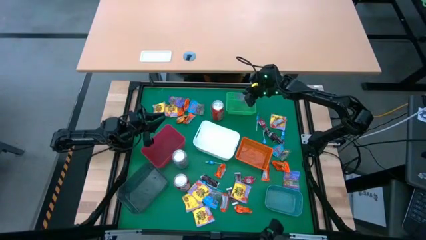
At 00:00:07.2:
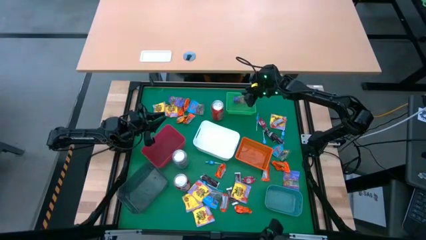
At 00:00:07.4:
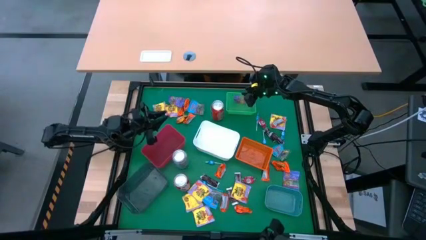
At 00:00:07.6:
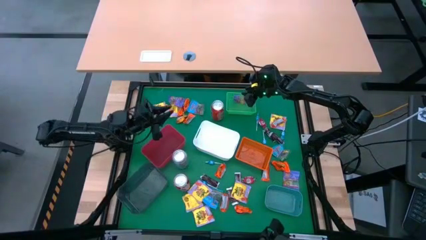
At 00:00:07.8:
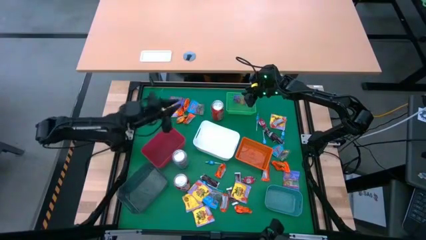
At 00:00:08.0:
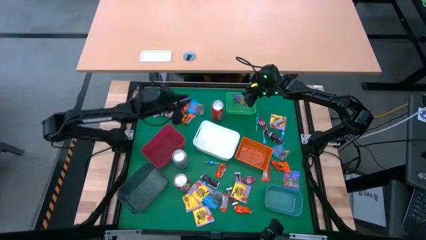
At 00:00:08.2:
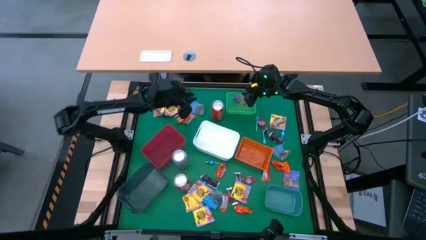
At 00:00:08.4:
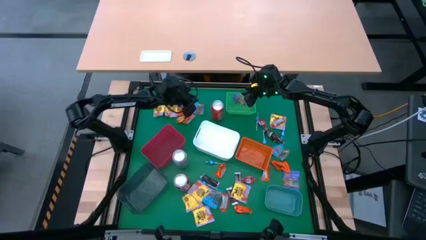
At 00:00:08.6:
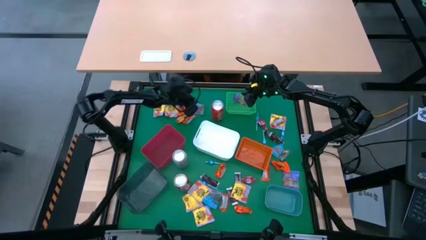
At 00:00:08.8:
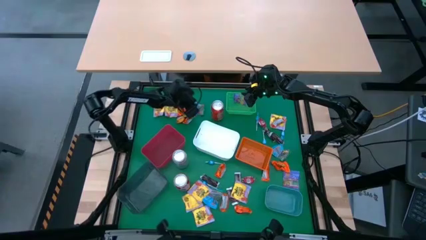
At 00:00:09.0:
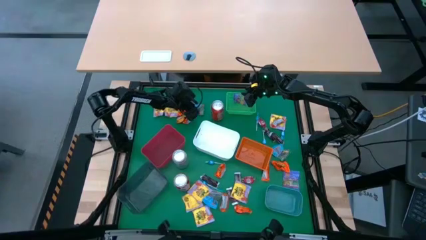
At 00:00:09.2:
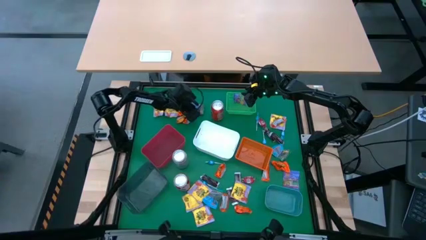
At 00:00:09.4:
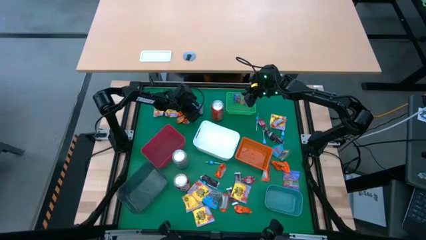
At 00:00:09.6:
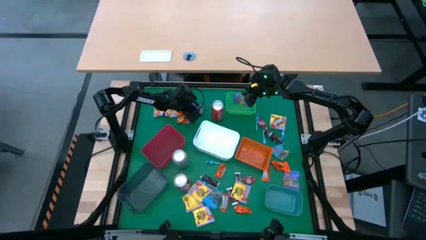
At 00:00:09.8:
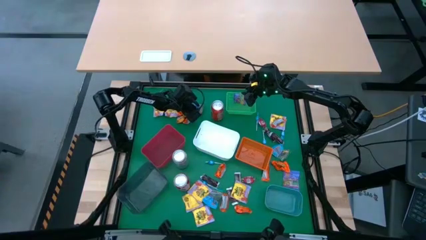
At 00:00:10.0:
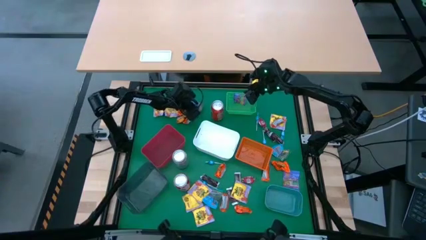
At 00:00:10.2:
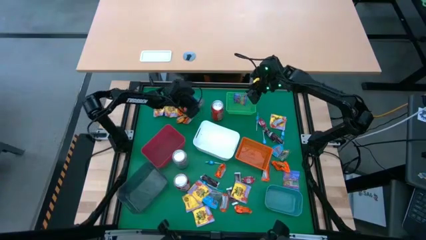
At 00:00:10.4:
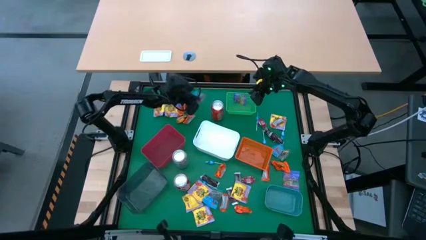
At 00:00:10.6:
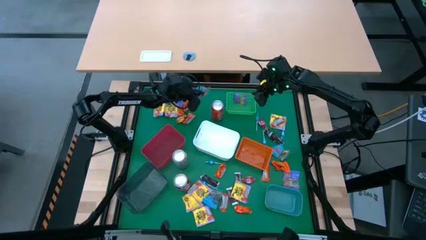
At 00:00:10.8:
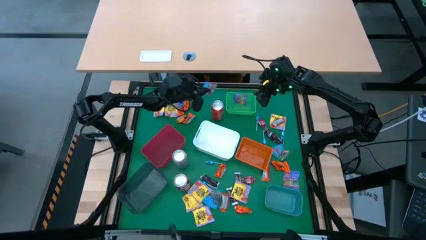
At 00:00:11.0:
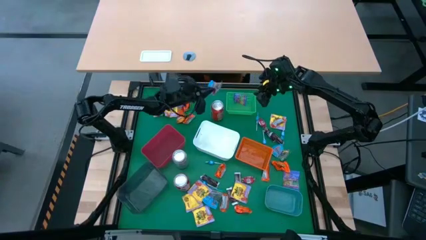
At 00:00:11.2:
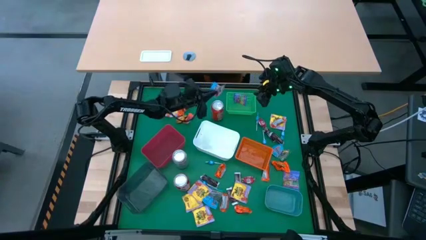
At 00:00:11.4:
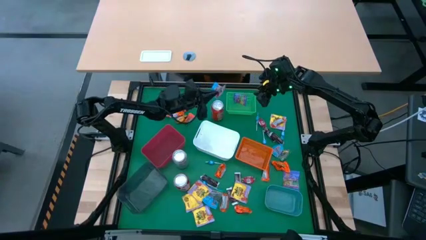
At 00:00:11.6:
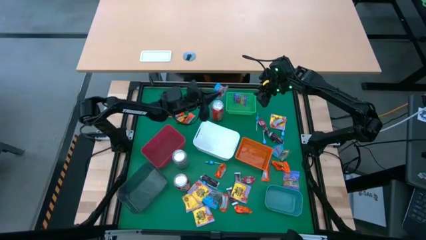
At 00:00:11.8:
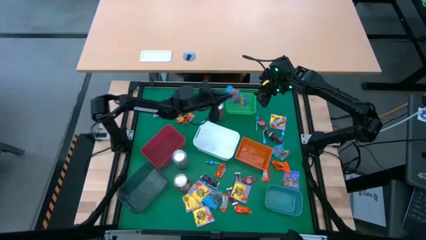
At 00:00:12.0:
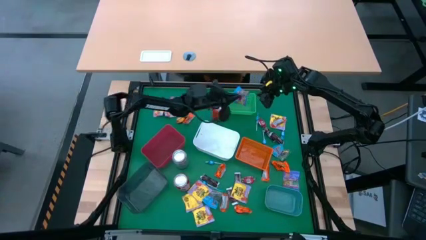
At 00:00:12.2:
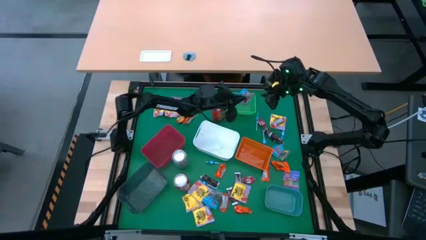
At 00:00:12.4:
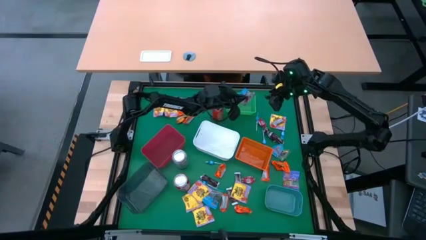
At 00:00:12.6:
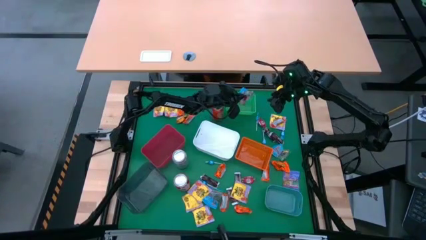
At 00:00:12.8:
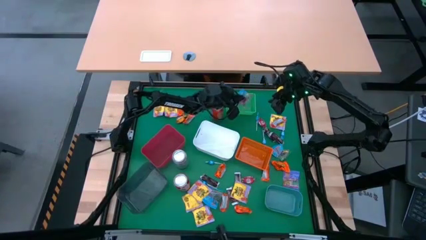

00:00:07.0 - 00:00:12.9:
Task: Sort candy
Put the blue candy into the green bin

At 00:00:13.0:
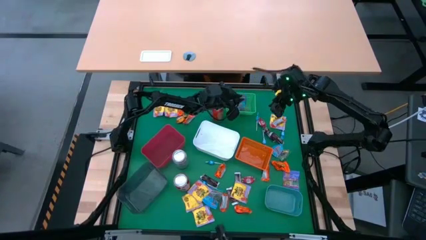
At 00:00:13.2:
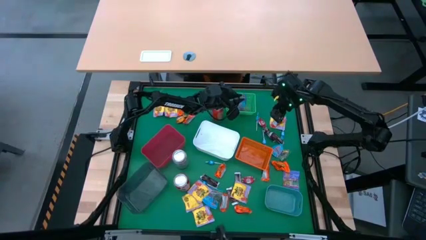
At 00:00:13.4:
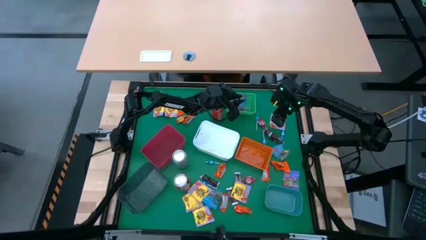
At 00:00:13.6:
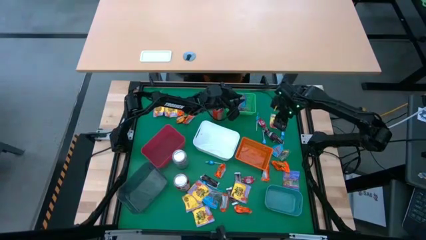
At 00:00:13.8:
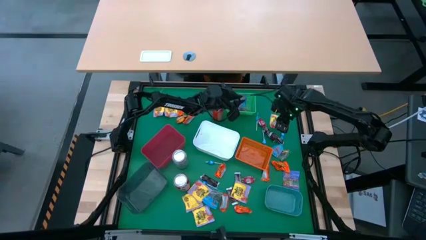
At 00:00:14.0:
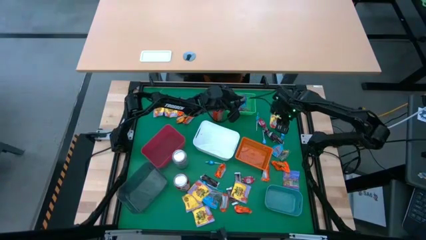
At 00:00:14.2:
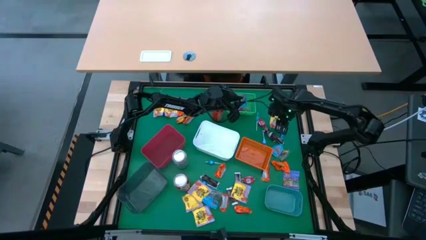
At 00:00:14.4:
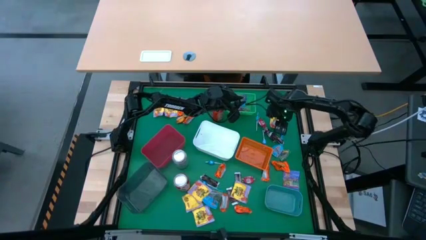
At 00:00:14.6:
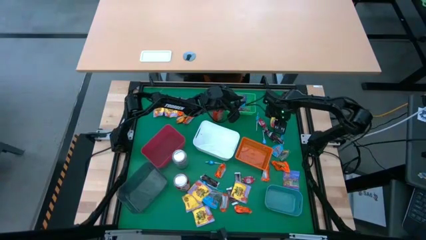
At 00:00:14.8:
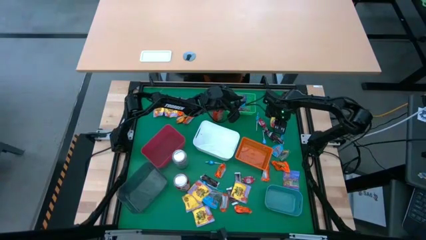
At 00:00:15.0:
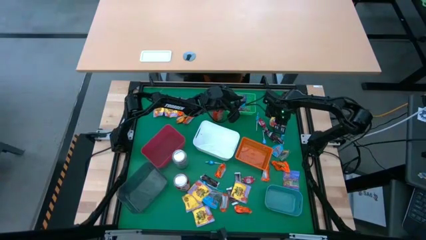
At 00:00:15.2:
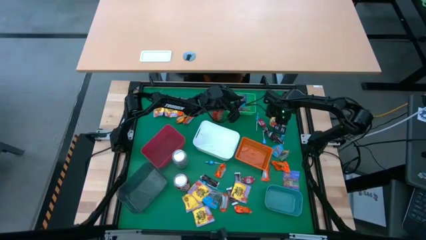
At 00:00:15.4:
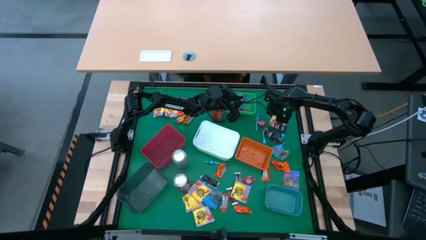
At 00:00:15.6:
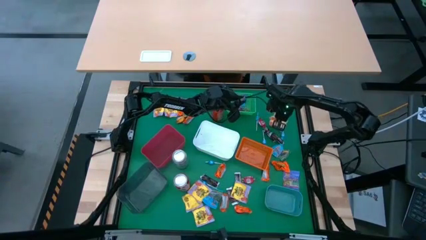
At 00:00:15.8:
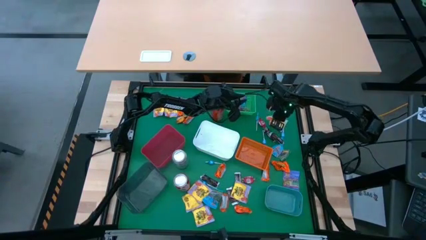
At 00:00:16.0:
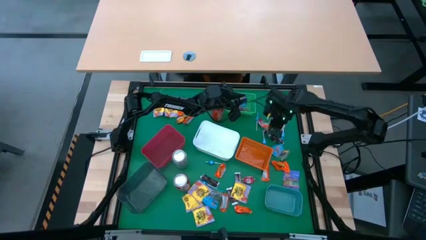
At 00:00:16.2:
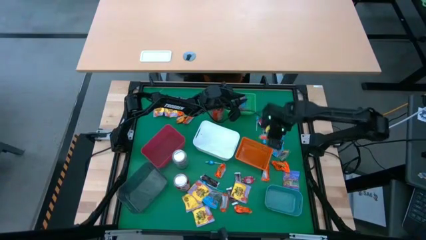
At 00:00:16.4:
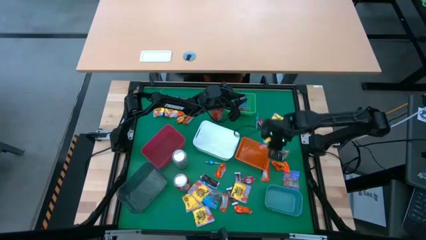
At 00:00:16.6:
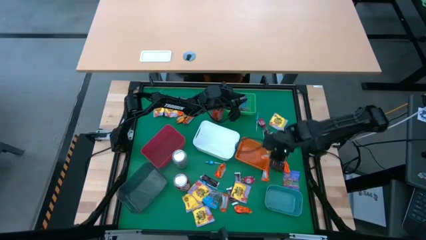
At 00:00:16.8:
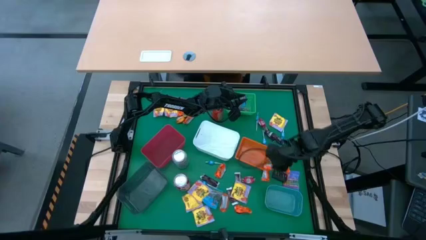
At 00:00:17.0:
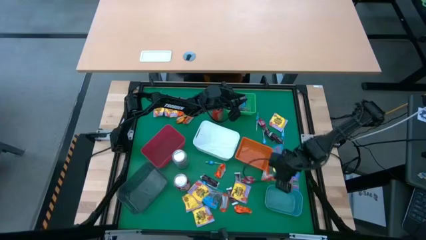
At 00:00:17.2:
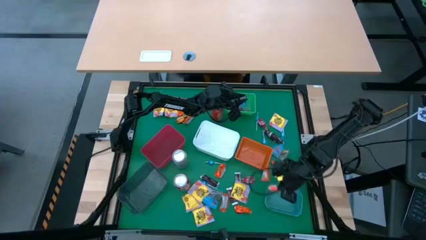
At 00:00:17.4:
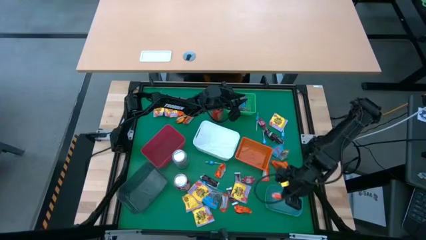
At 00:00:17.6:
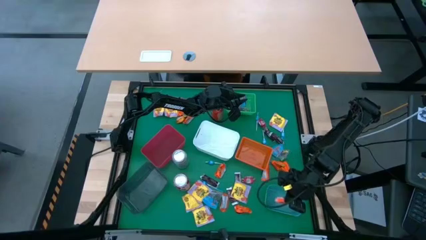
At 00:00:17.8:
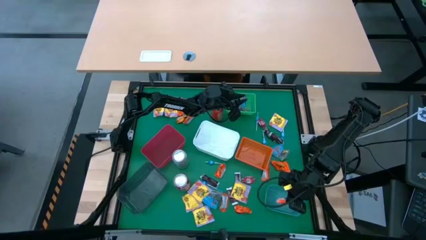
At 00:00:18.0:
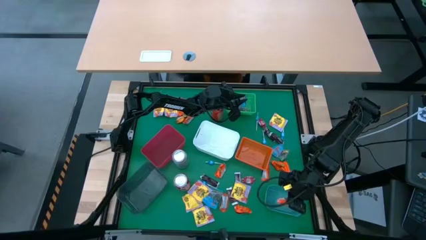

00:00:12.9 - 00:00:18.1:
Put the orange chocolate into the blue bin

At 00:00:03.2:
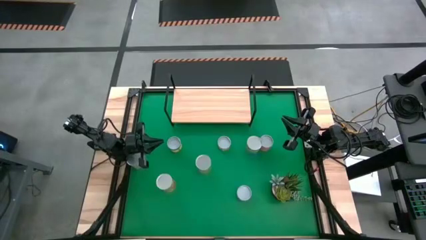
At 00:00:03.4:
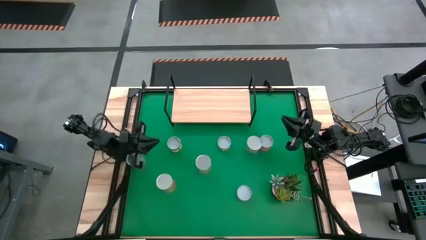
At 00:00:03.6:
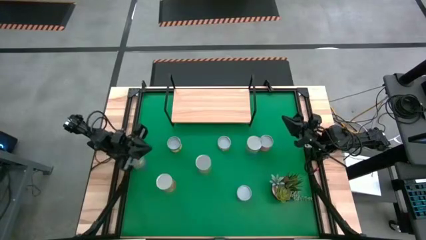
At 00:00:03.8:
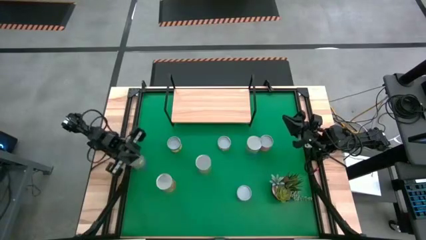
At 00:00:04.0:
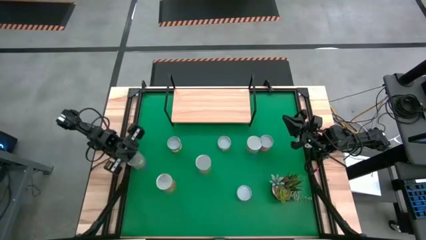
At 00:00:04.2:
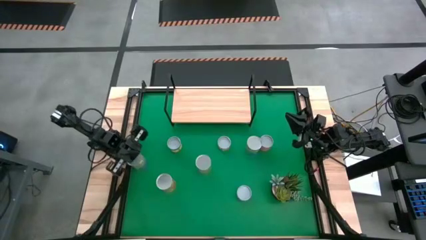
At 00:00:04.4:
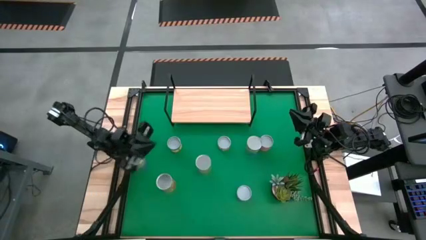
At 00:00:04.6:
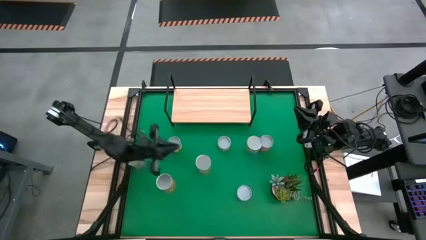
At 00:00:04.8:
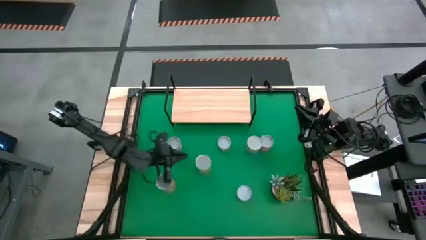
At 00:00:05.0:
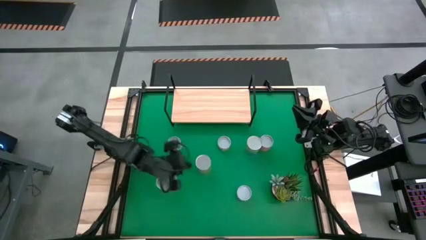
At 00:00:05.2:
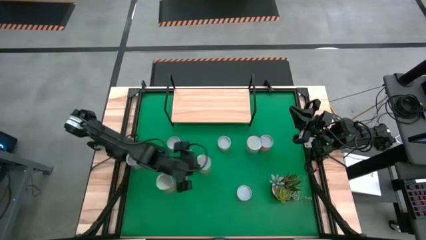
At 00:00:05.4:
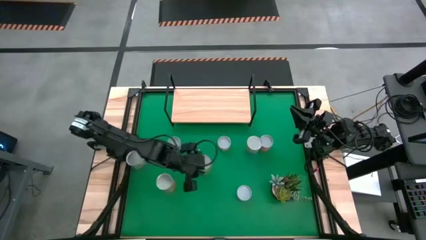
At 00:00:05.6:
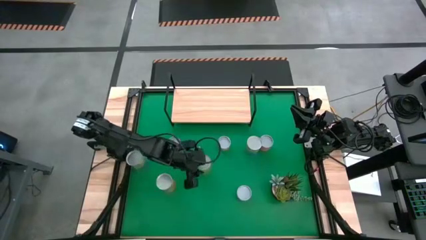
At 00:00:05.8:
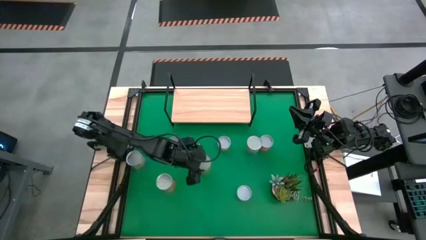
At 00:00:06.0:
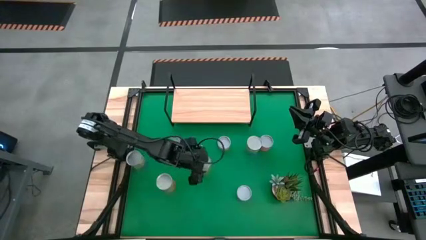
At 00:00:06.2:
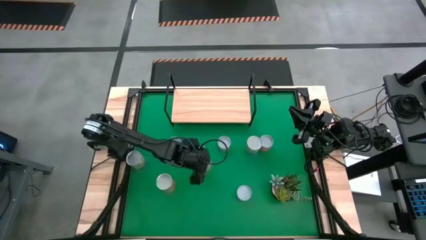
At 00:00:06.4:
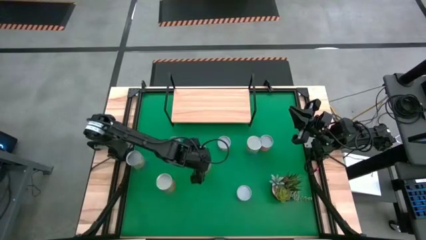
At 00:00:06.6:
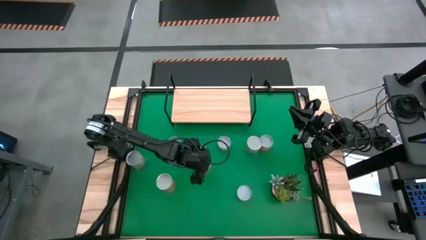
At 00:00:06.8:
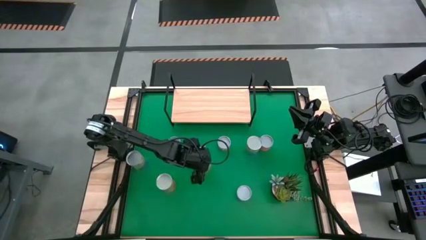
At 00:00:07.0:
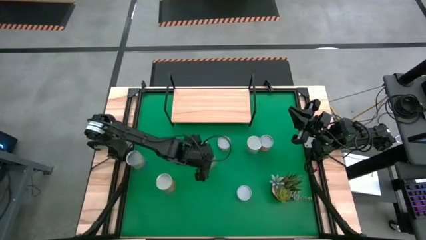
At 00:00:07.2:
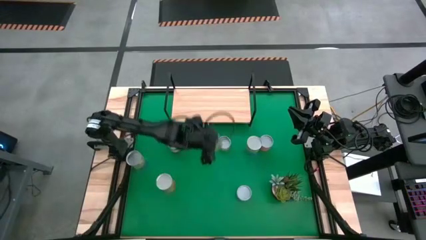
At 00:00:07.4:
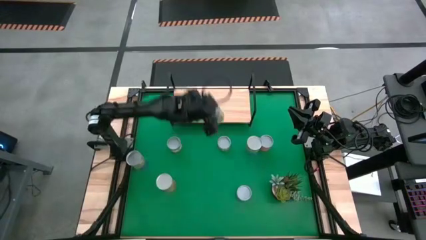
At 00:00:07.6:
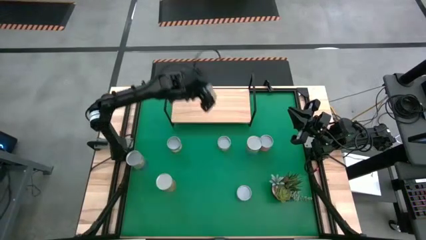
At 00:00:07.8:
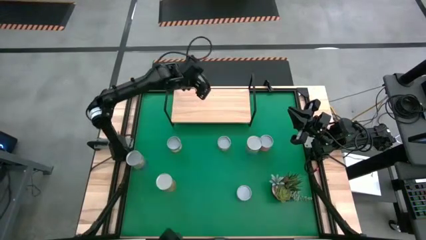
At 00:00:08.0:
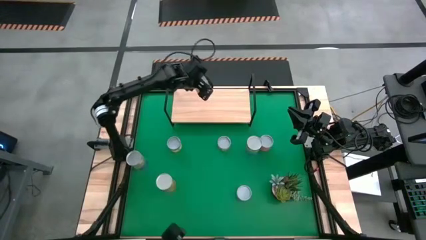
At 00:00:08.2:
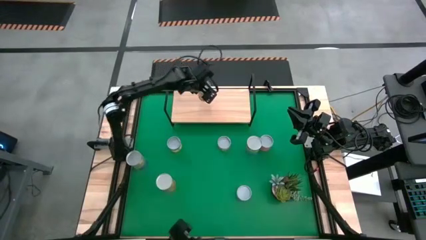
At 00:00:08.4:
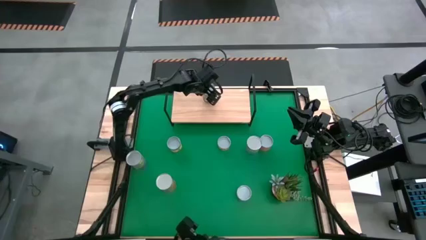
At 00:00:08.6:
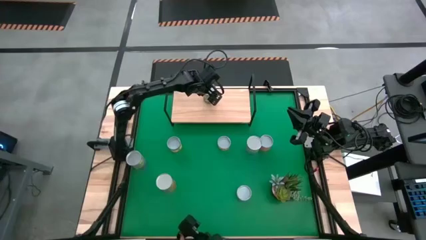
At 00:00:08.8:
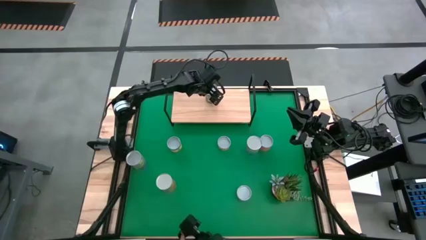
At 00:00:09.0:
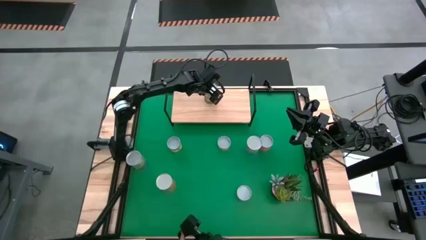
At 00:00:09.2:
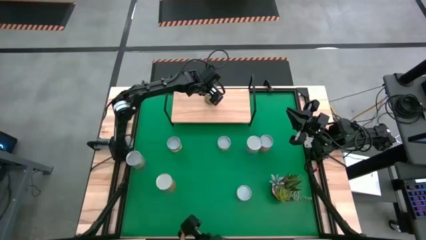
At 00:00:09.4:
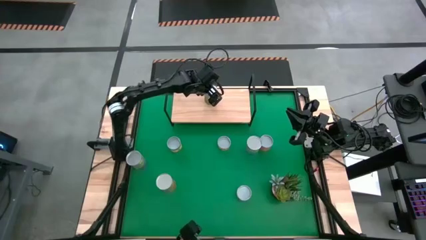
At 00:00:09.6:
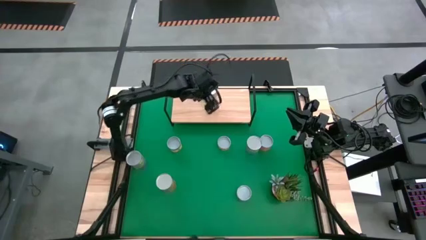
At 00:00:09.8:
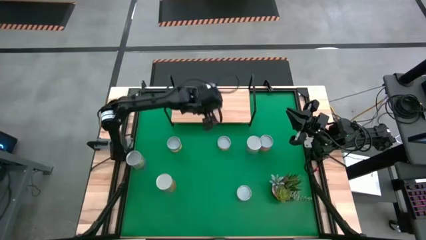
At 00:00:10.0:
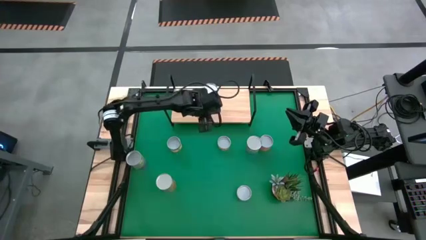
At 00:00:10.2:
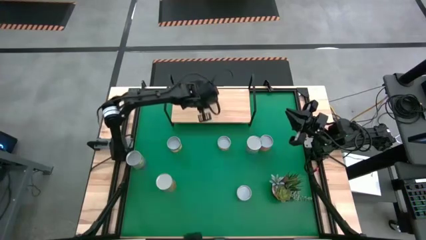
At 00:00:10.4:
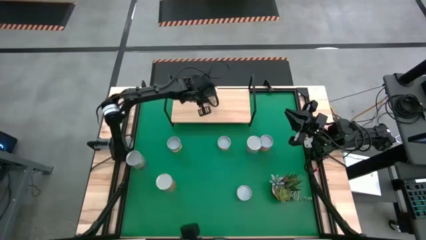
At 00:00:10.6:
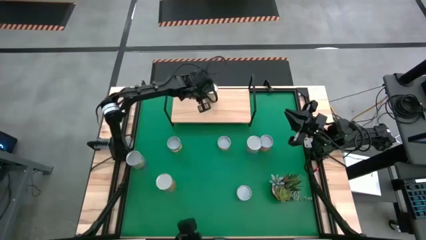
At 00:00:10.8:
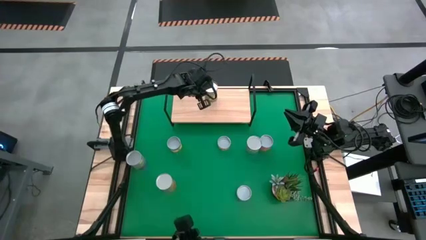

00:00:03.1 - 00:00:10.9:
Task: Pick and place cans onto a shelf
Put the canned pears on the shelf
